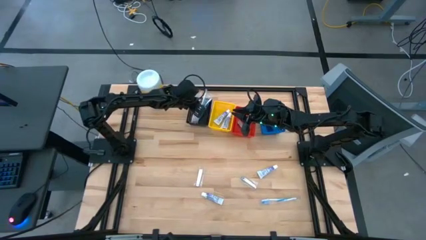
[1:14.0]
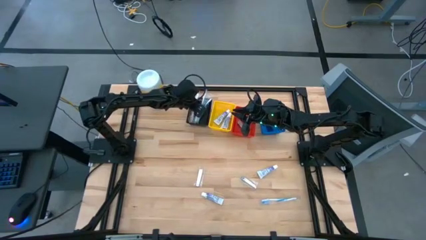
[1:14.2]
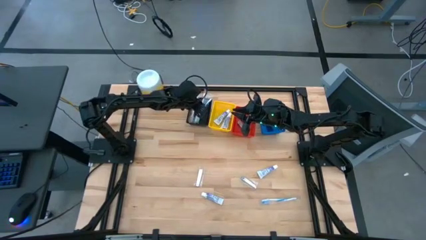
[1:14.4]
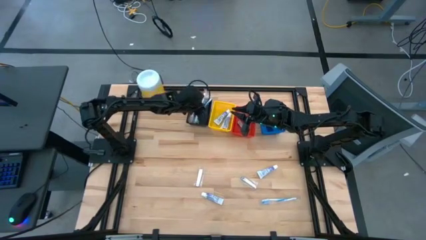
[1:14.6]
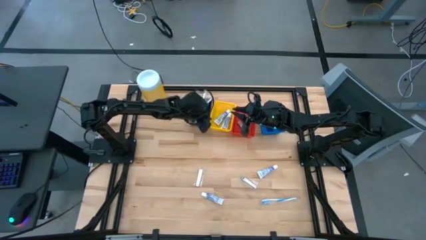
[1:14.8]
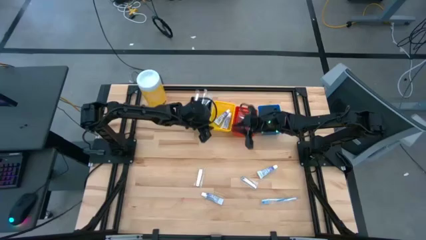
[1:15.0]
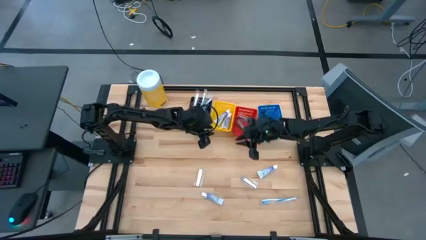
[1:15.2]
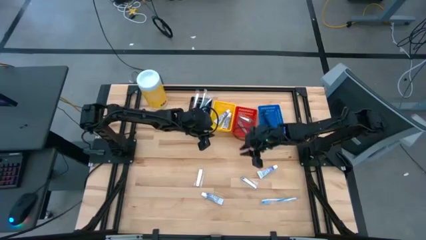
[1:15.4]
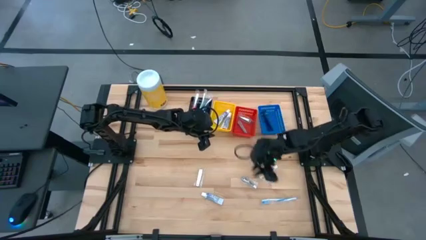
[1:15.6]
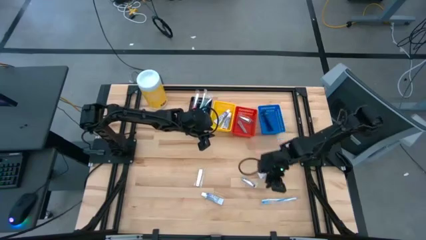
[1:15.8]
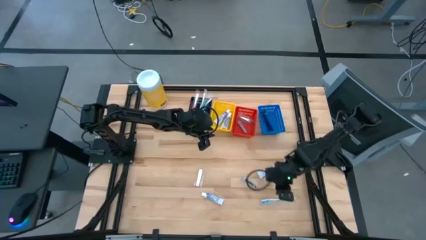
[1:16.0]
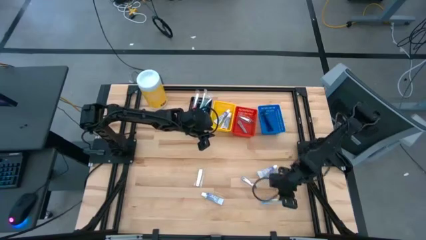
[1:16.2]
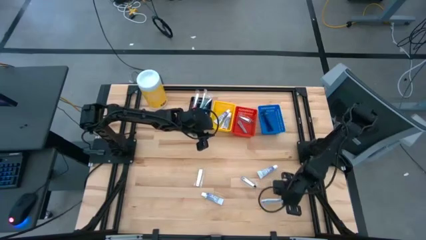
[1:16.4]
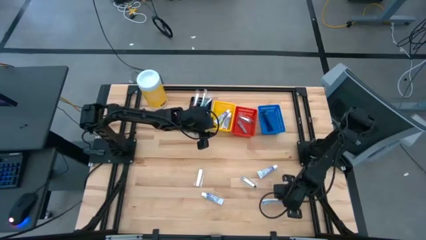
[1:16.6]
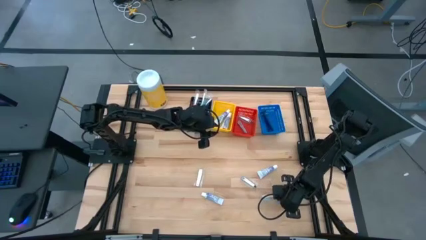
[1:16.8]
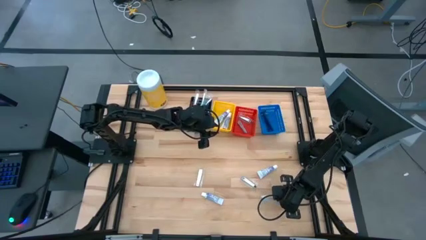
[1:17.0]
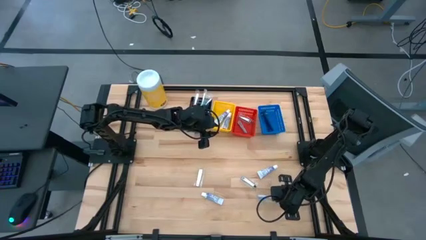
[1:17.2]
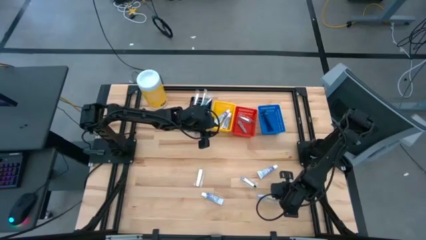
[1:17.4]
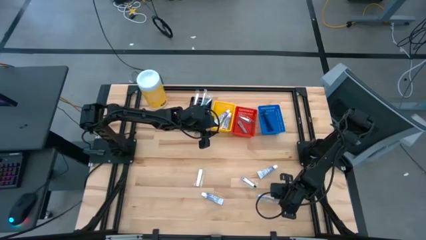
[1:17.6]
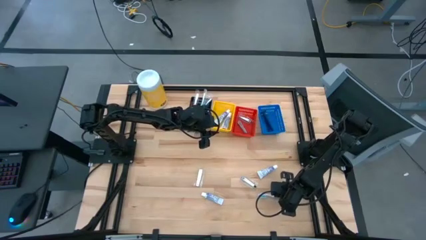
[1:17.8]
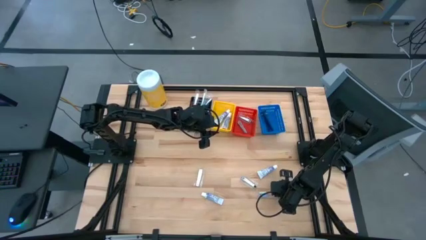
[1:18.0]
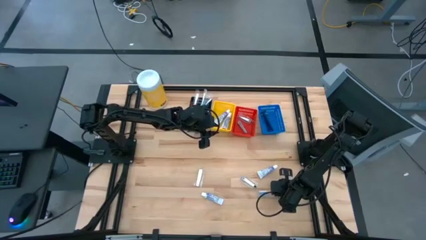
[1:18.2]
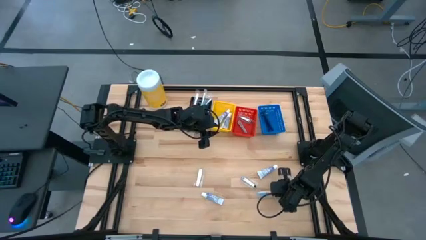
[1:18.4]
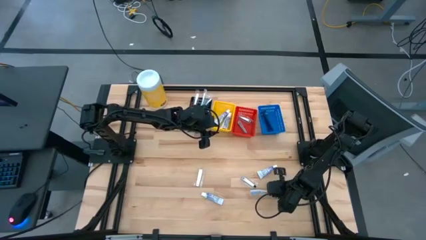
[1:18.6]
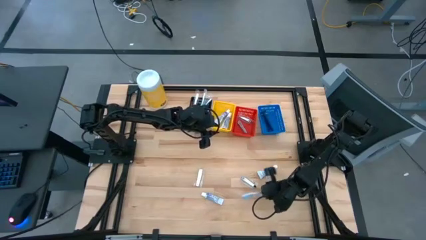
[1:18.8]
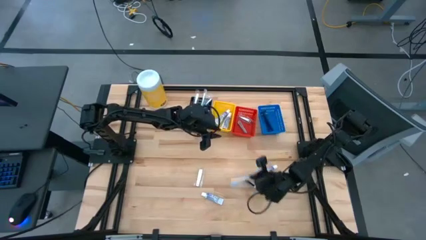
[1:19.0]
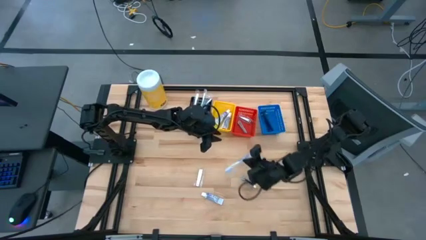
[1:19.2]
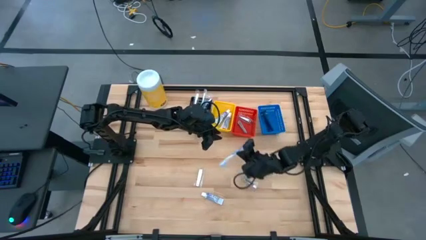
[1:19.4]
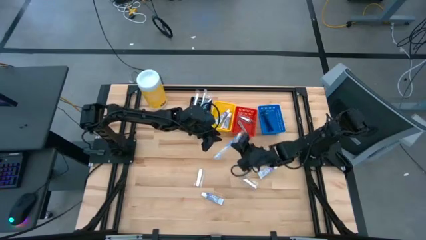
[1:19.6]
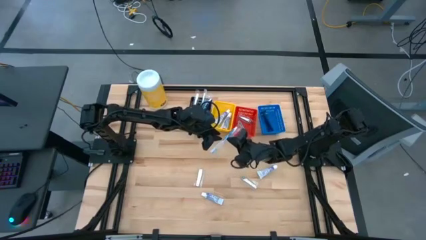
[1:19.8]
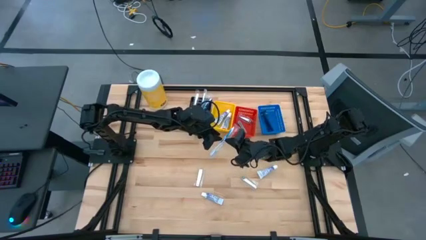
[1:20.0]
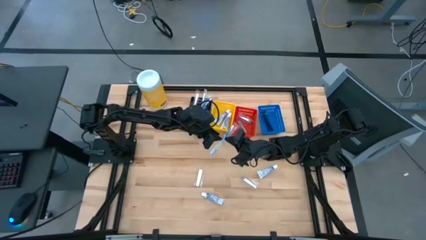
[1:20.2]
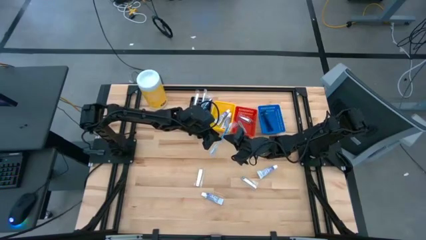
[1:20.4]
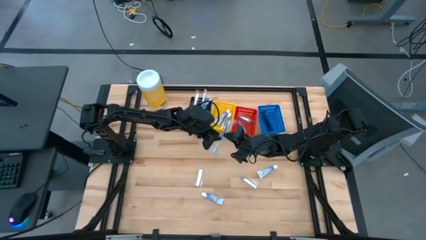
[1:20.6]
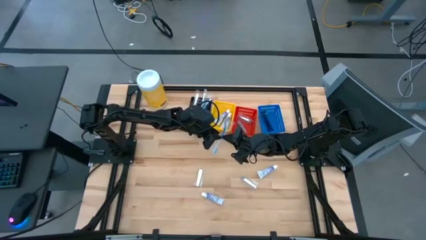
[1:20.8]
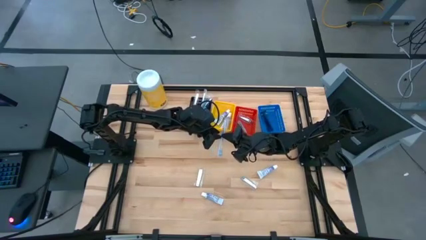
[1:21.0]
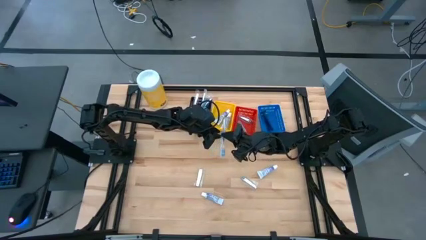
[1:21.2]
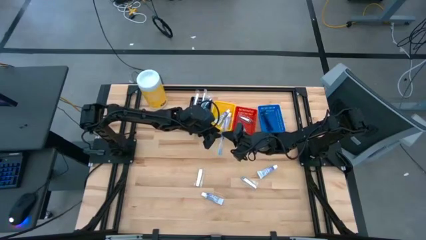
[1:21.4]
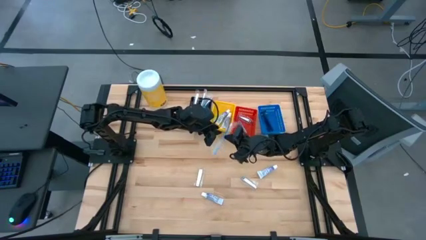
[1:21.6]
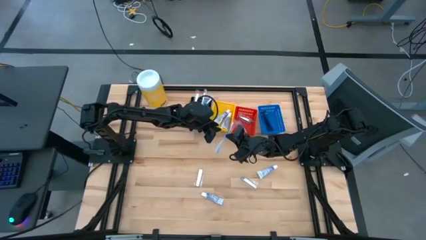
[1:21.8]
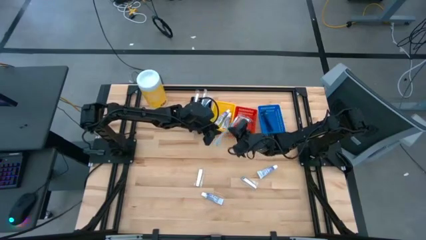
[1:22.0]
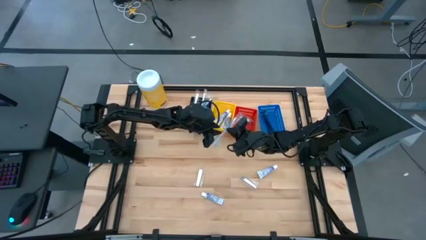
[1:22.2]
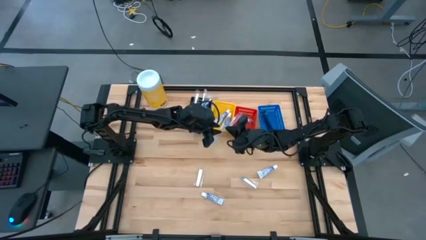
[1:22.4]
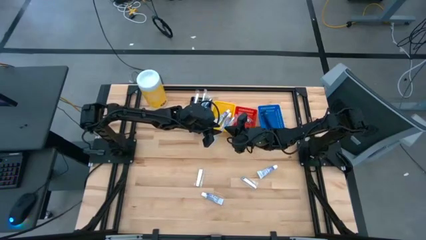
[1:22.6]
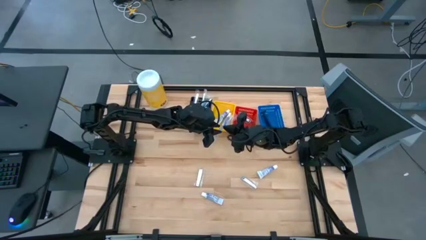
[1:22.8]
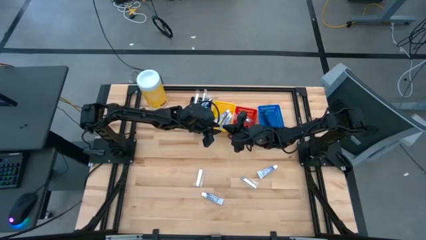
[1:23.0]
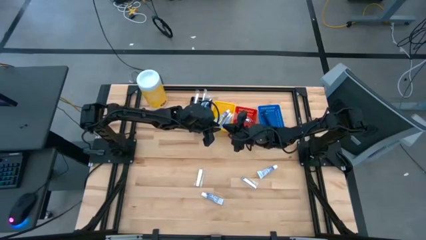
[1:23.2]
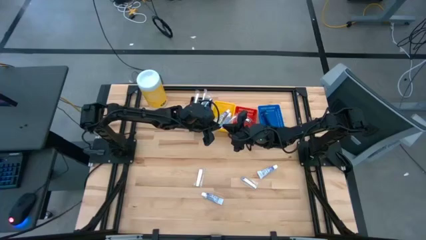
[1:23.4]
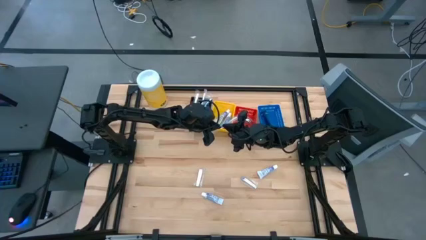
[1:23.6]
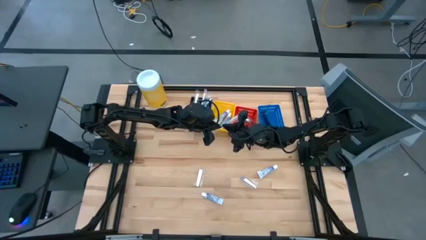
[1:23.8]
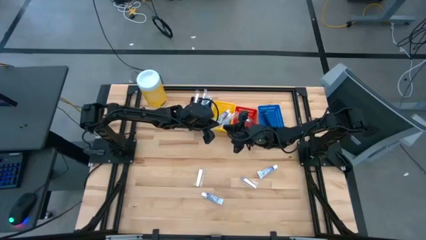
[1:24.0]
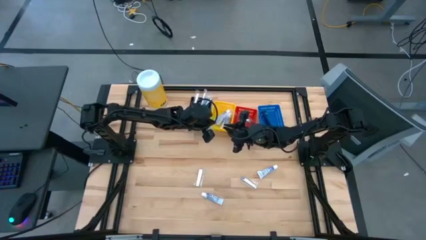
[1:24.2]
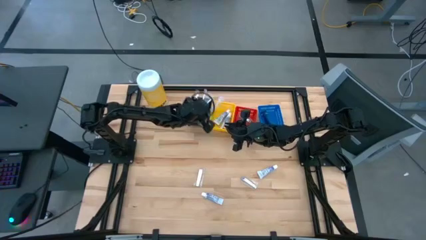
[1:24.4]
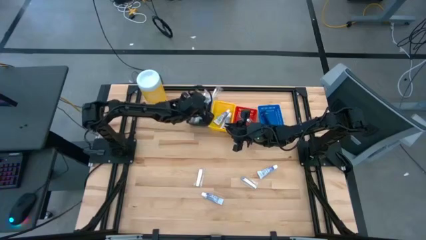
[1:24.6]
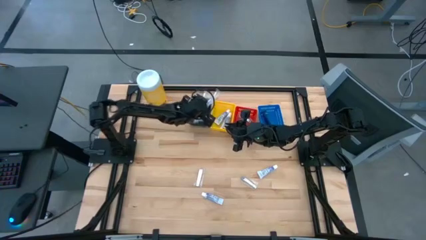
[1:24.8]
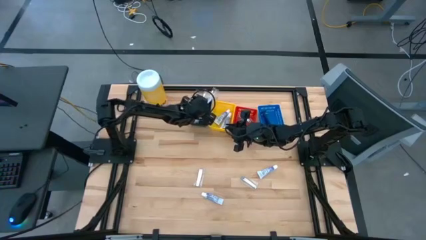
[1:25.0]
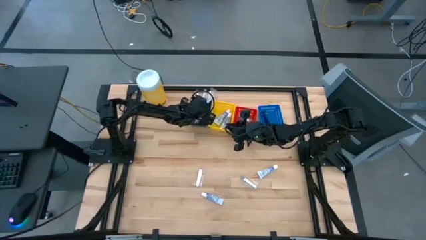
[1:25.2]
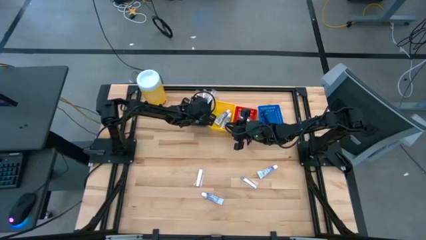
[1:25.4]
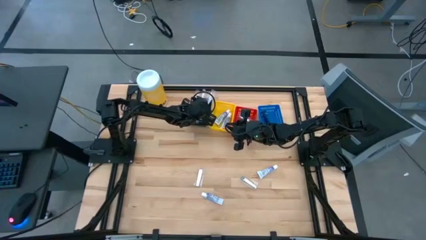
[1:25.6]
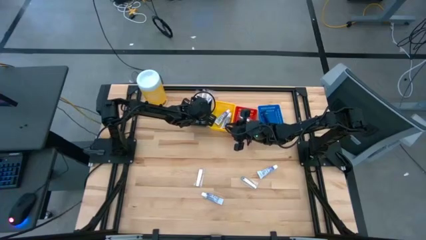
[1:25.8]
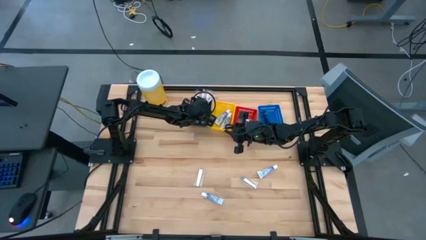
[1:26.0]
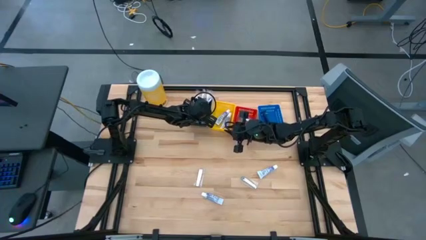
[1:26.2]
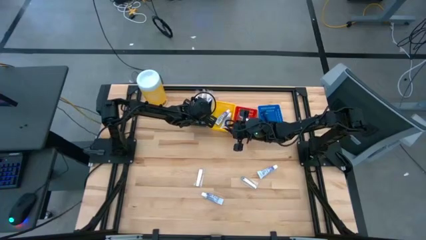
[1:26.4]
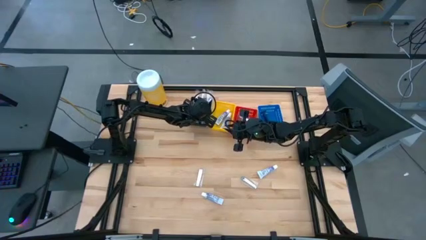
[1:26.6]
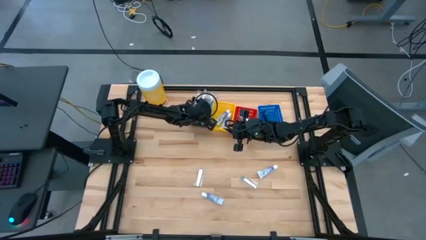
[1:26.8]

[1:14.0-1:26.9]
Task: Pick & Place Travel size toiletries
Put the blue toothbrush into the black bin

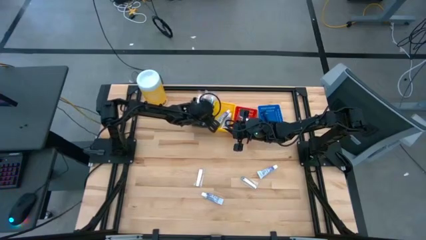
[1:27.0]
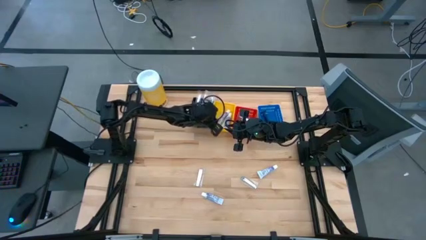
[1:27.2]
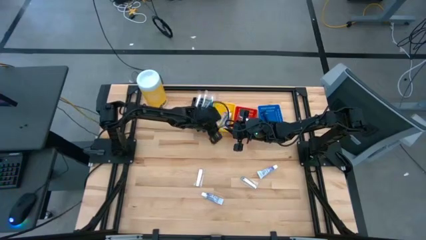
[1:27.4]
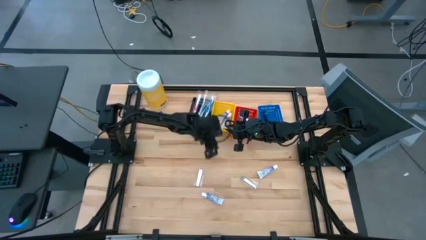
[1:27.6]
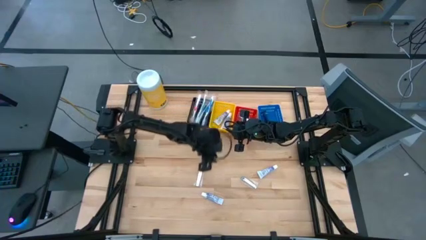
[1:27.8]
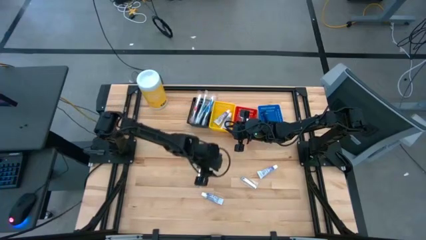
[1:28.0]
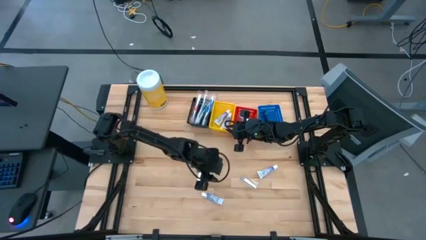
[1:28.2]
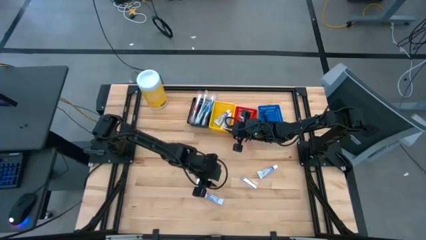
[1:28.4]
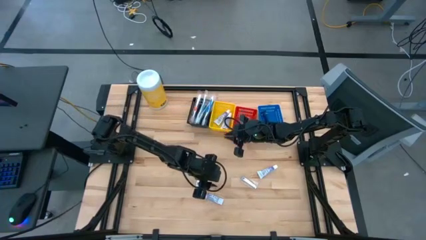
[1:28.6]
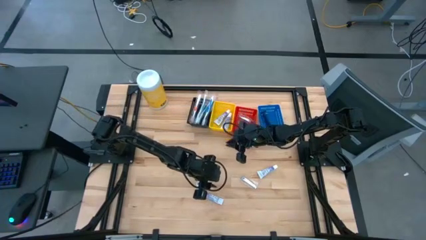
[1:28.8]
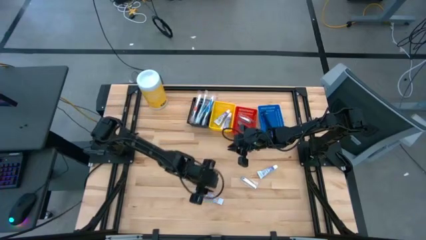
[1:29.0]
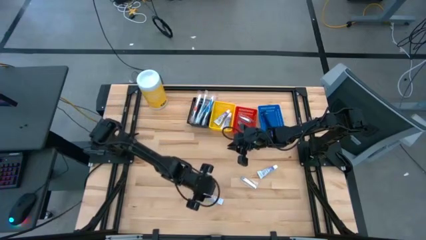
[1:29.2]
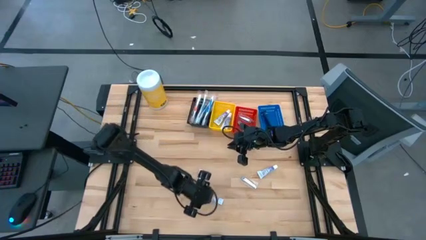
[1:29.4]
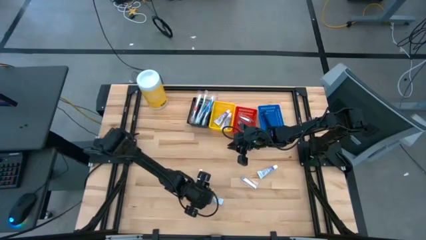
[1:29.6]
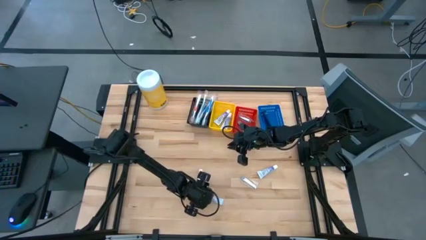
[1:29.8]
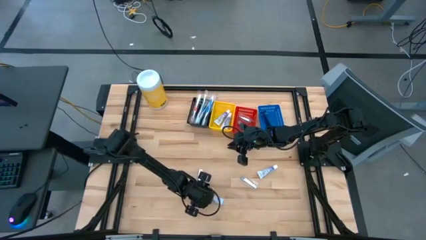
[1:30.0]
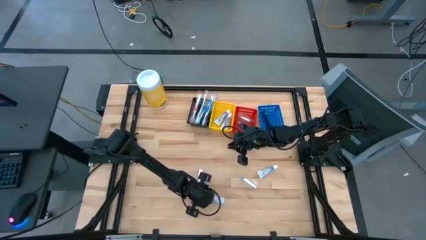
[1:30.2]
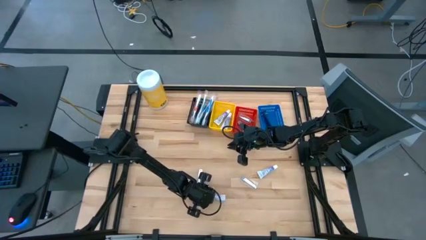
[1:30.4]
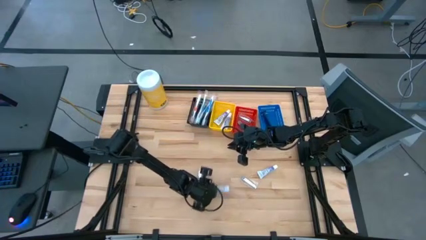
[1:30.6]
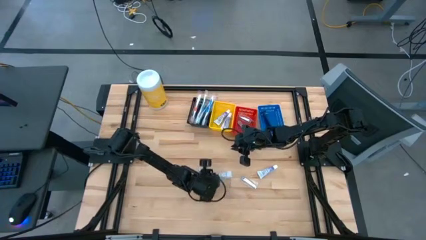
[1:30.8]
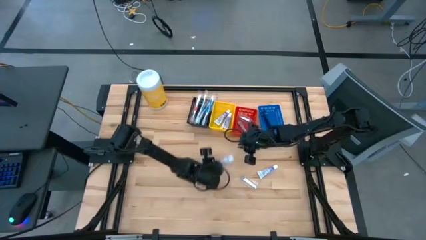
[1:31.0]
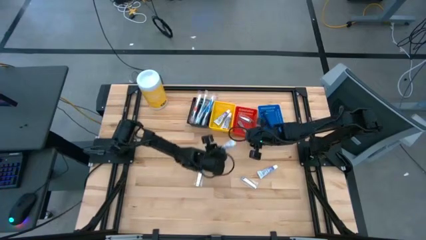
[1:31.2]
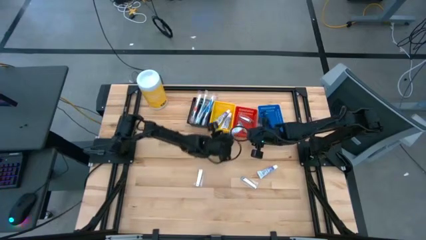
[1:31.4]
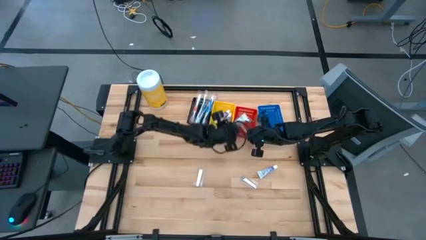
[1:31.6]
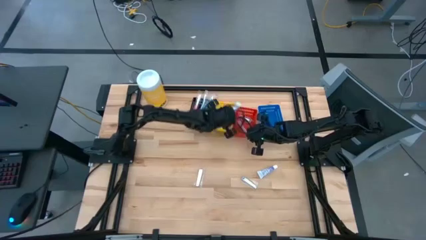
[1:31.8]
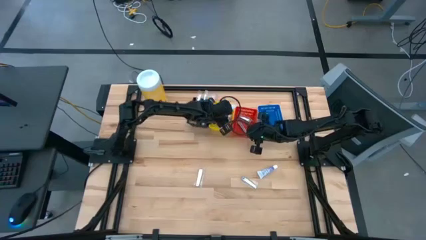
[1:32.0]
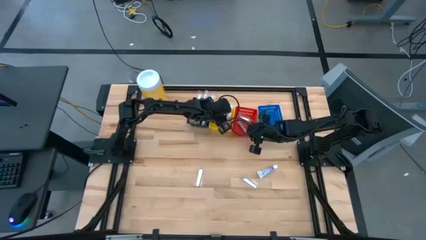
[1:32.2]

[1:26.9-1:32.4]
Put the white toothpaste into the yellow bin
